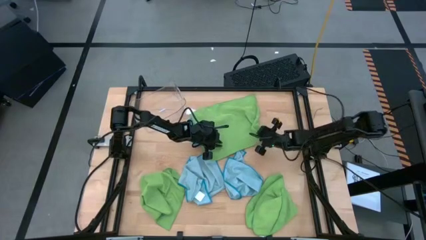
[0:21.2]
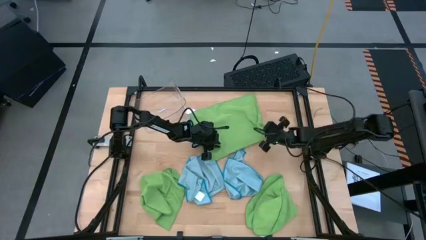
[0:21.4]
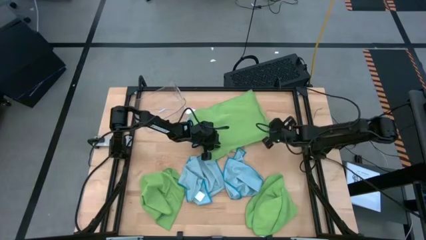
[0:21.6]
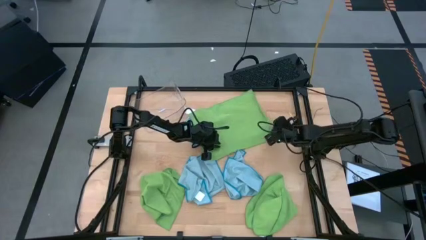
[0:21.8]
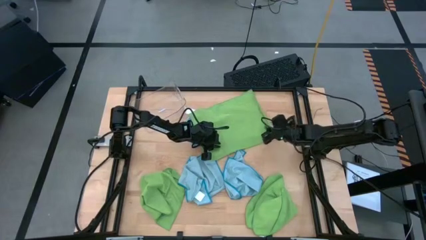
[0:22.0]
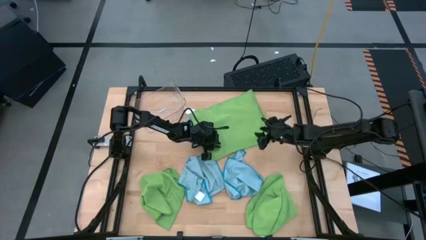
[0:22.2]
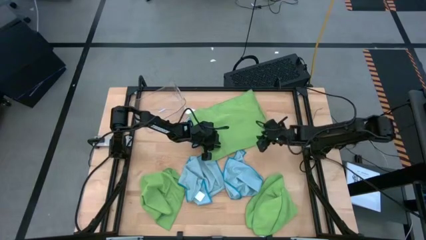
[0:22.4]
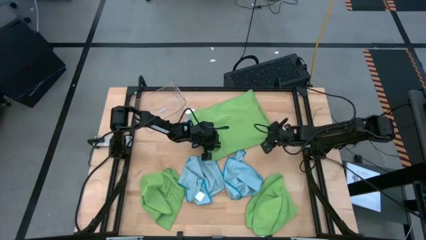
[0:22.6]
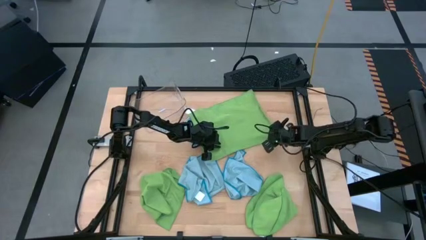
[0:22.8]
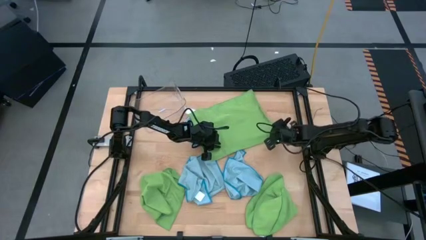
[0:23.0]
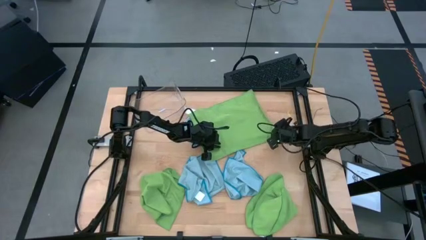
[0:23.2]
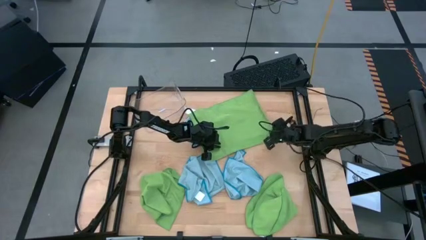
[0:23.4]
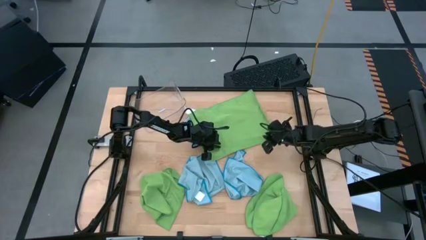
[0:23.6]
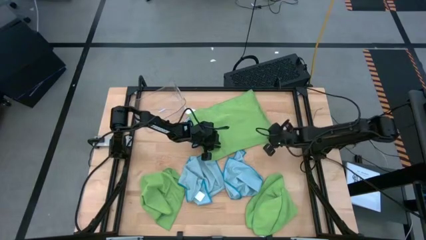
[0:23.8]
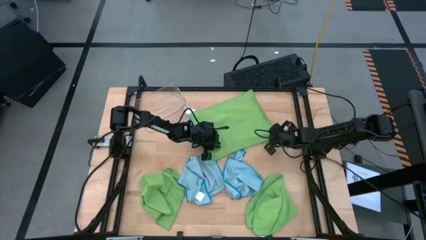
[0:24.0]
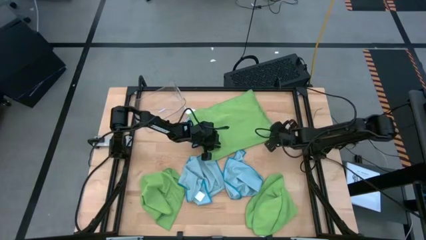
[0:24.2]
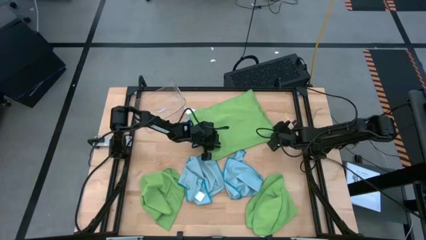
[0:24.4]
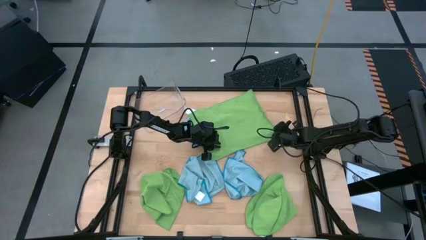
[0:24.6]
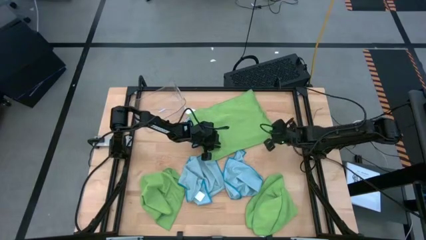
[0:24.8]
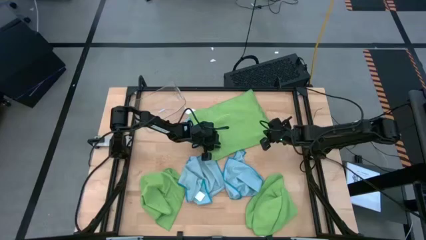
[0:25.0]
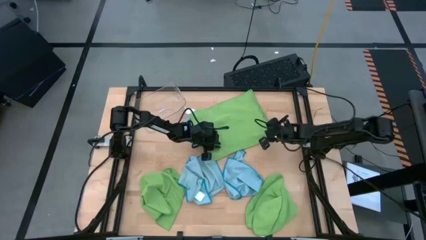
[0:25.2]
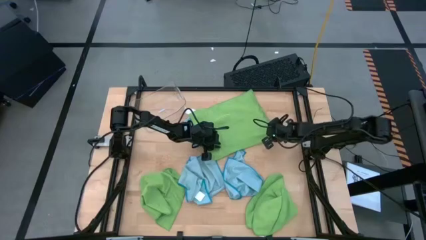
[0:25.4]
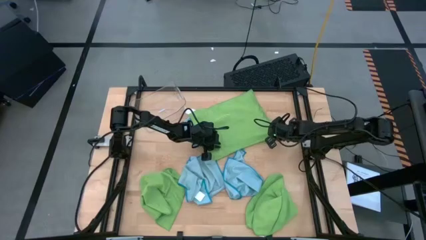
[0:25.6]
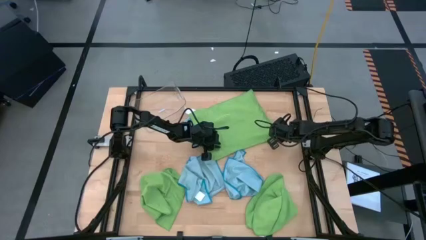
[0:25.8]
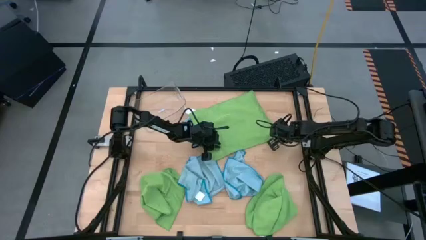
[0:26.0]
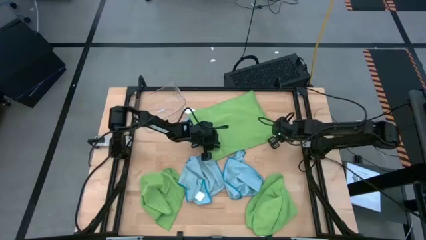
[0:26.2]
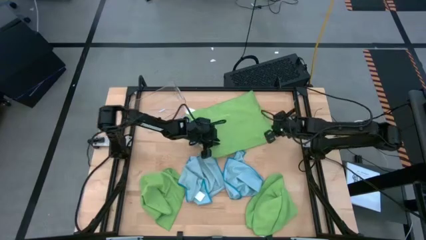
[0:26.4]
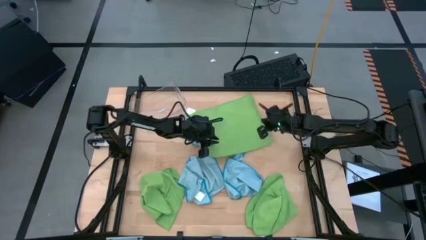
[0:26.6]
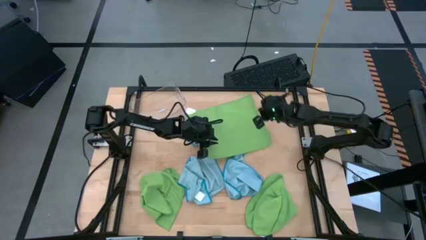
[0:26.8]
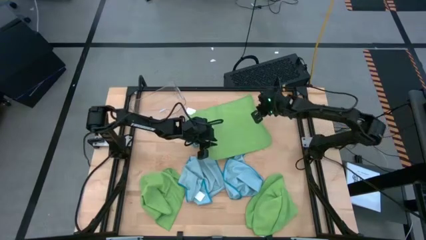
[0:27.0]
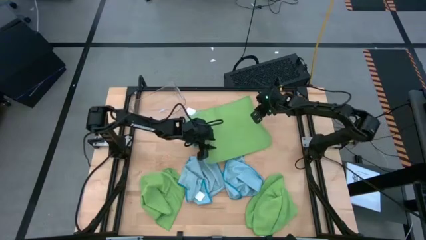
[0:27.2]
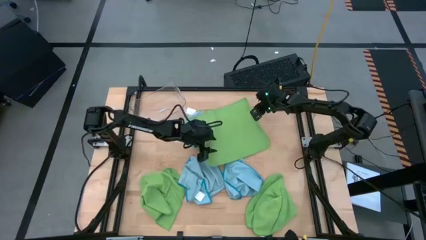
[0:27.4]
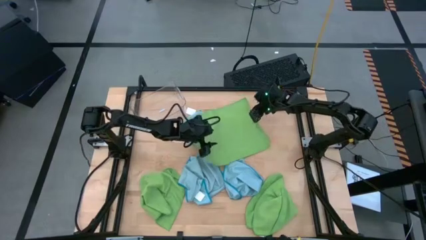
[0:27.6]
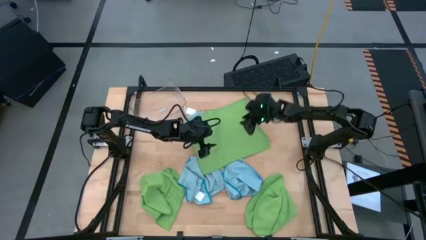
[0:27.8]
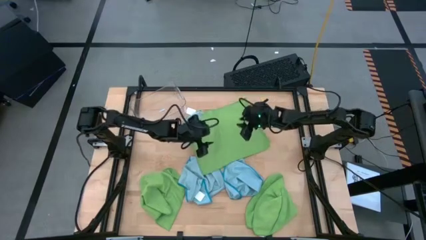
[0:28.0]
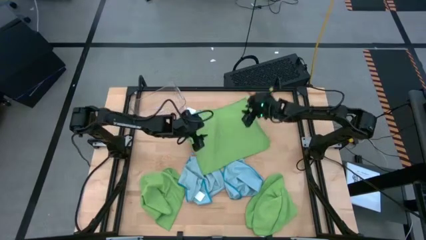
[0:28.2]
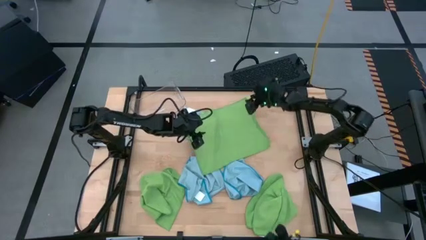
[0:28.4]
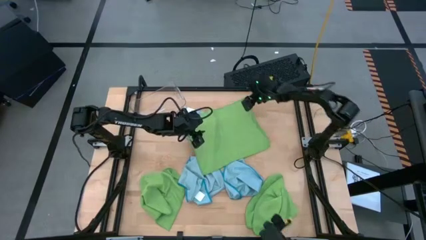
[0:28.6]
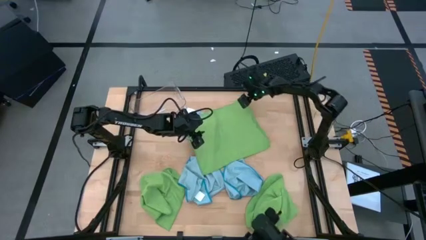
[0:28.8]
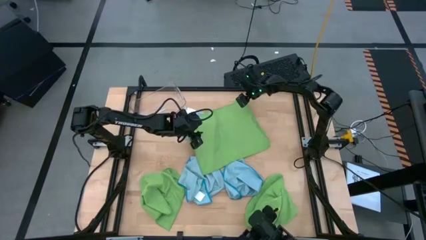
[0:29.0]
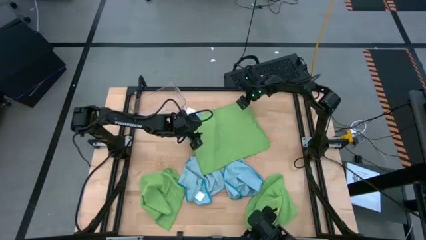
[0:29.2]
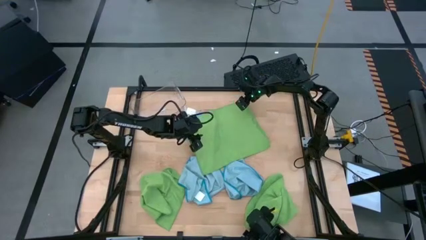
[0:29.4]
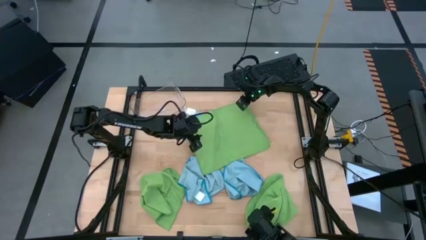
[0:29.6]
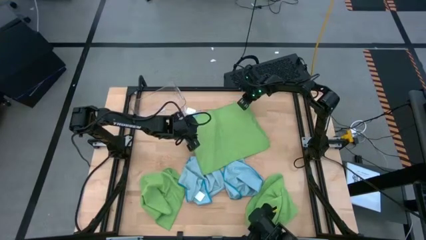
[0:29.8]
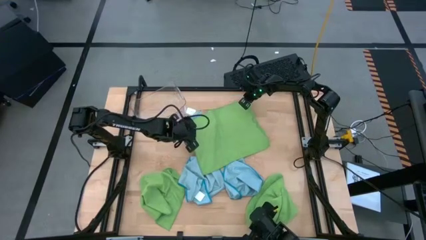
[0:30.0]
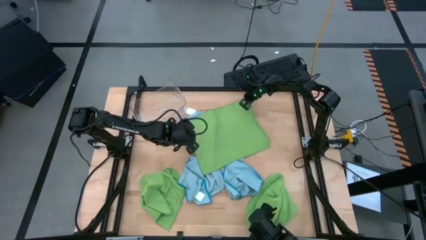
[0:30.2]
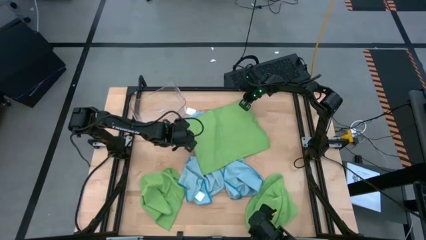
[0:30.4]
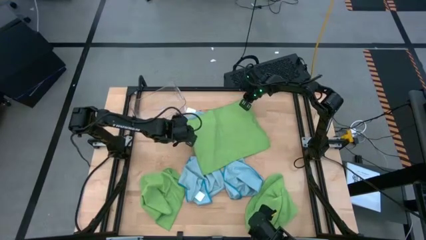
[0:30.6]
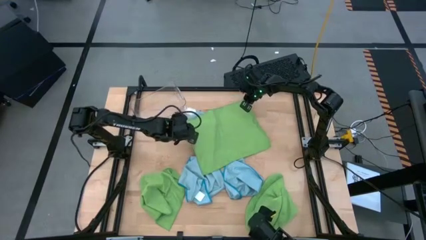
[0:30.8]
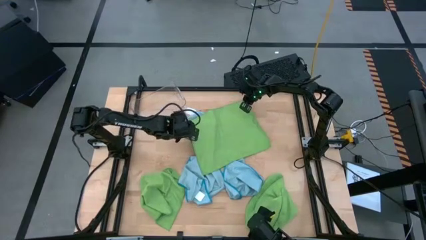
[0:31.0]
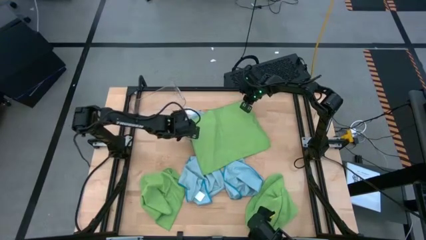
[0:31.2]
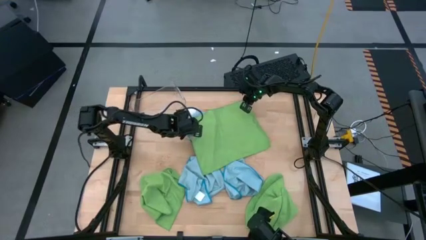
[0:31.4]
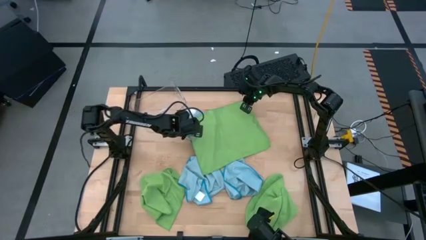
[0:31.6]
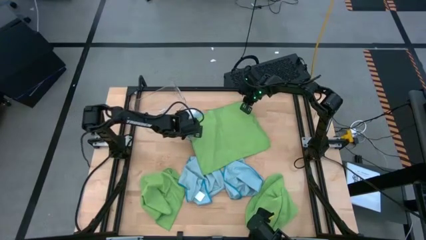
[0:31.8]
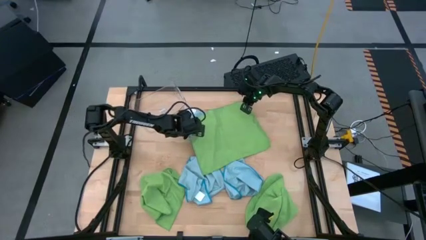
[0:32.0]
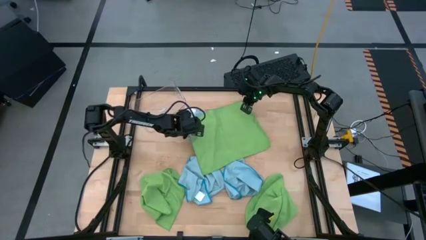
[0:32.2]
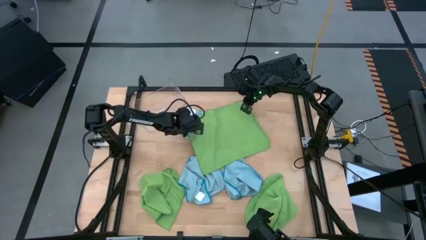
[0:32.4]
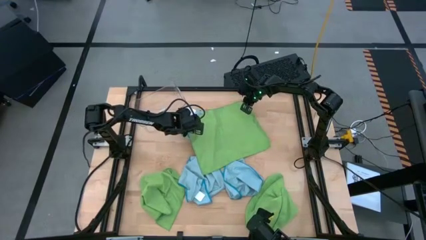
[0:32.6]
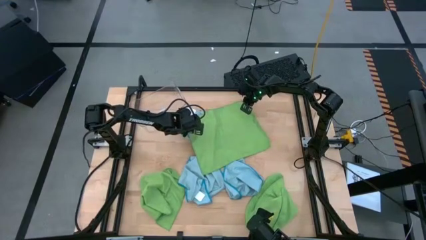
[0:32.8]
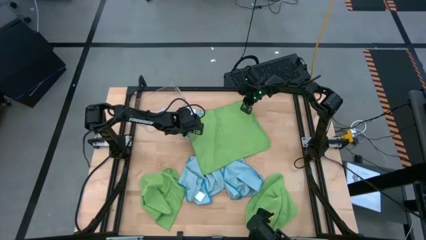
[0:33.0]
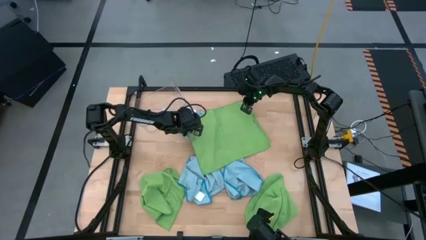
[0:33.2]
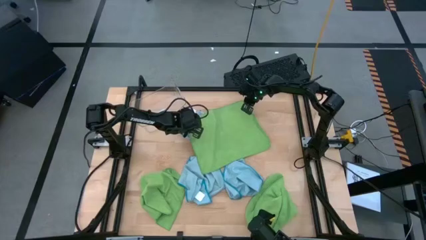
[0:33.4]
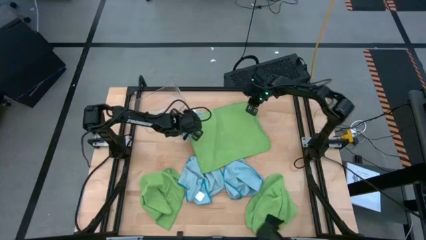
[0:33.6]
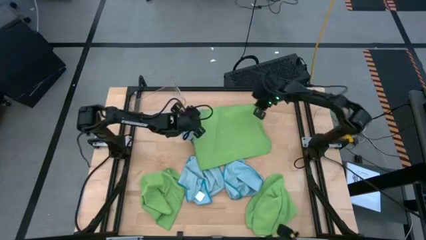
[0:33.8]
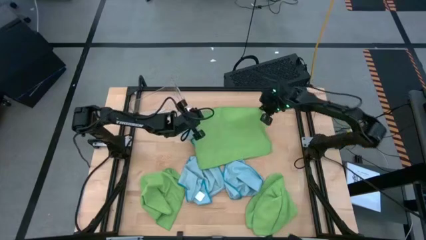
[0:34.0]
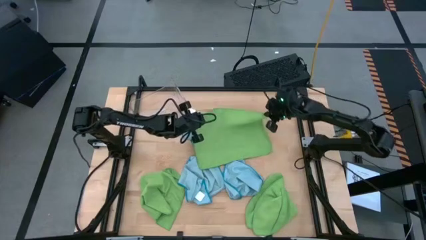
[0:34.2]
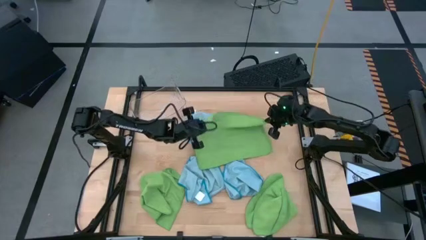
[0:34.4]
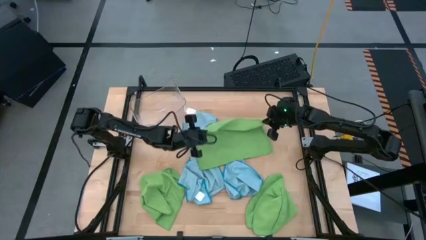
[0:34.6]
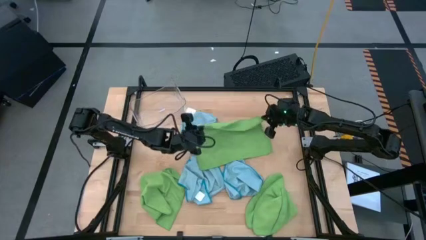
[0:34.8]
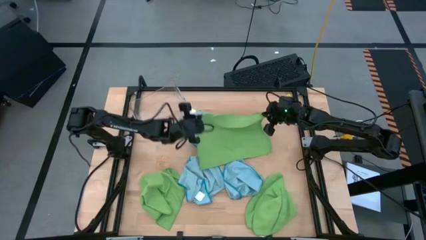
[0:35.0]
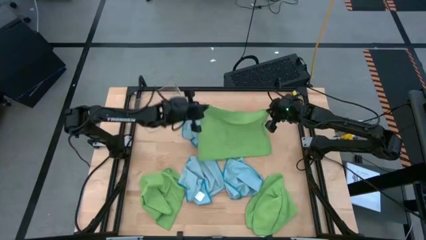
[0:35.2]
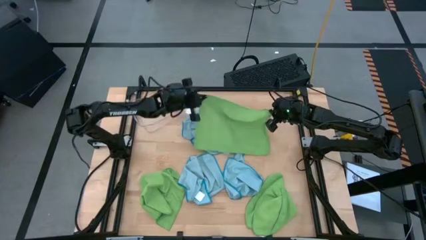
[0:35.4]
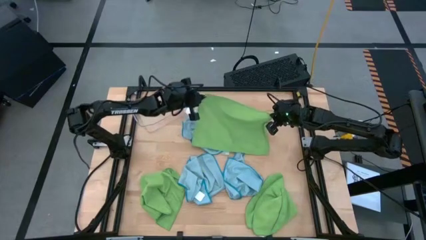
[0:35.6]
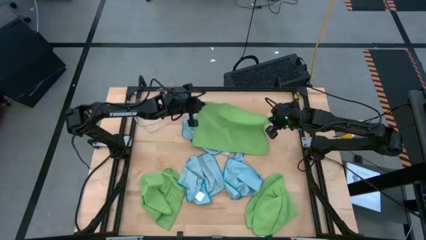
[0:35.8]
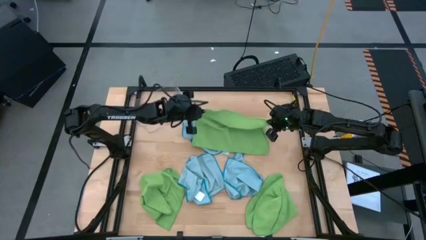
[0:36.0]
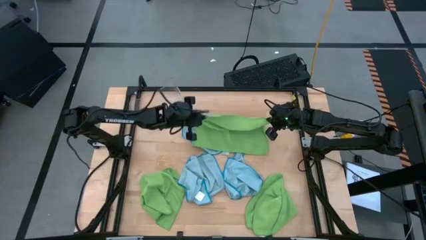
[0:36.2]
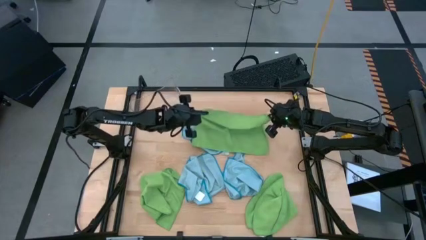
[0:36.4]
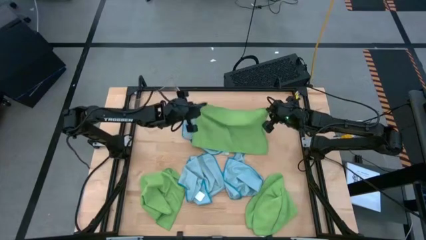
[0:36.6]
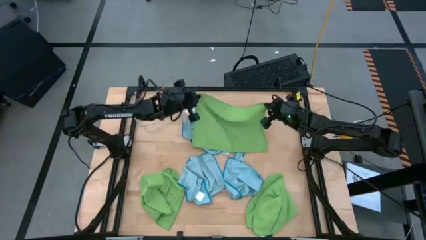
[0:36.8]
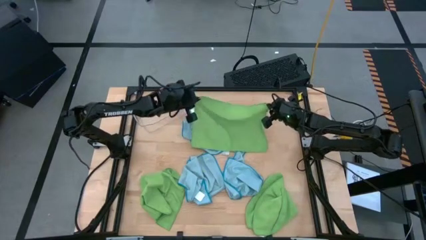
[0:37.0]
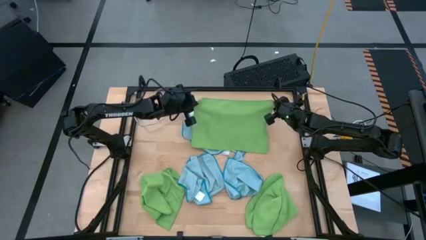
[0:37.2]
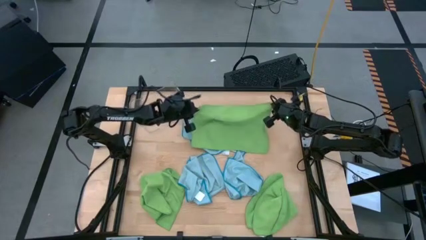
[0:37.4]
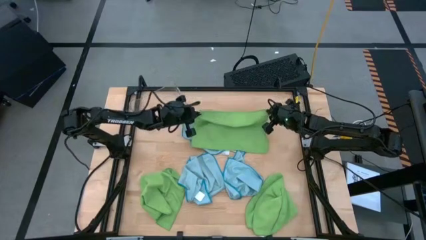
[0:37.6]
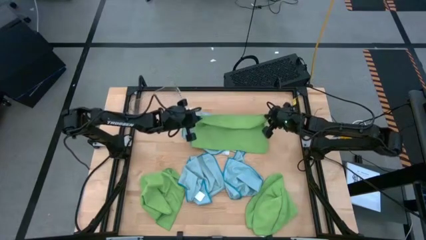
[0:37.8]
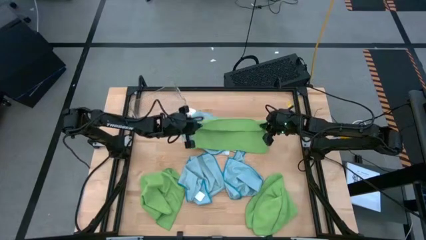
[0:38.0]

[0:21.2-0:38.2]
Task: Fold microfiber towels
Fold the top right green microfiber cloth
